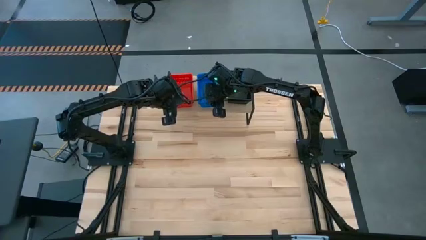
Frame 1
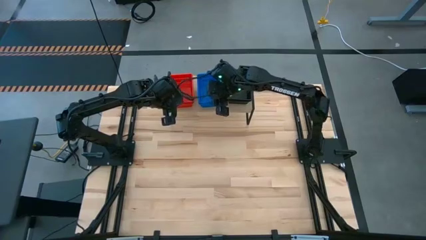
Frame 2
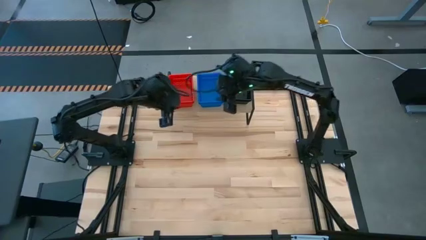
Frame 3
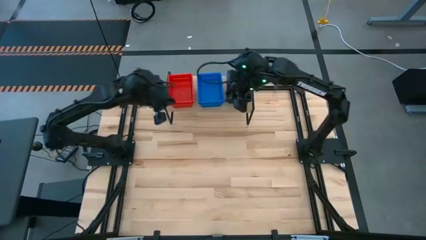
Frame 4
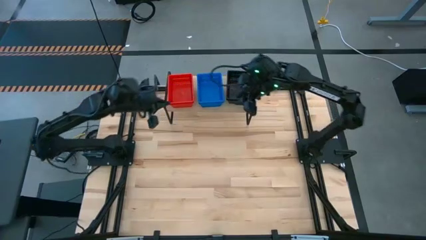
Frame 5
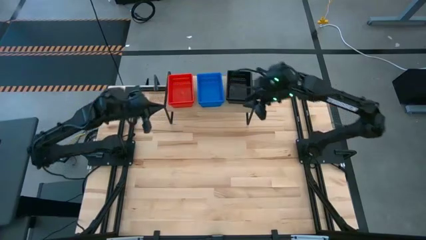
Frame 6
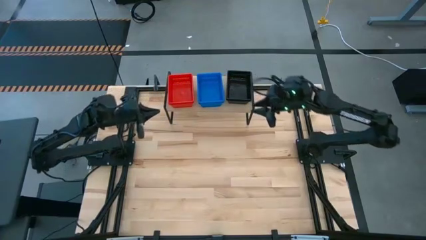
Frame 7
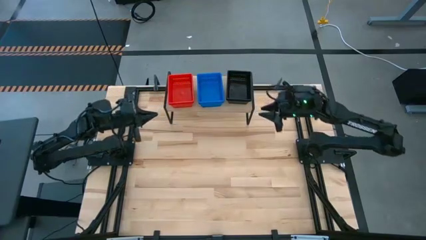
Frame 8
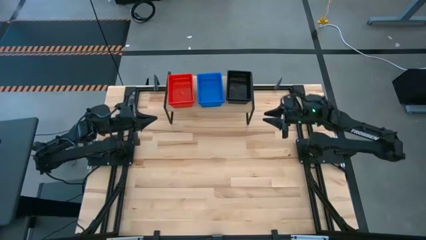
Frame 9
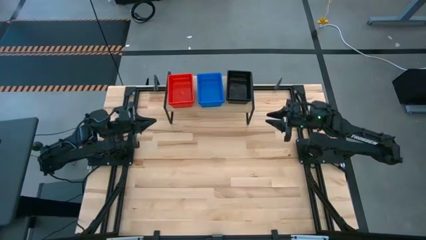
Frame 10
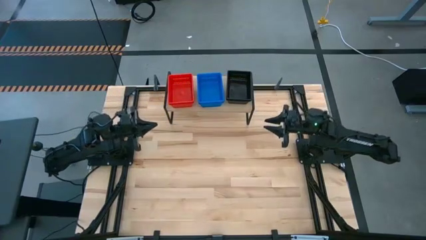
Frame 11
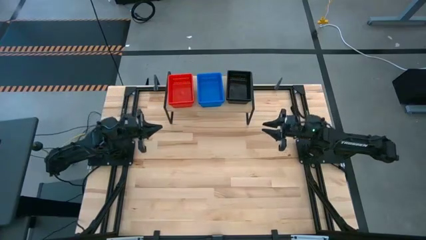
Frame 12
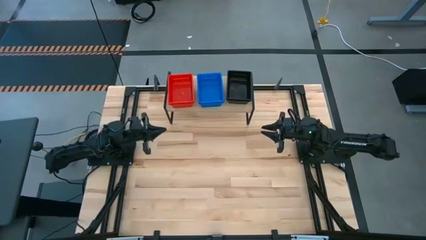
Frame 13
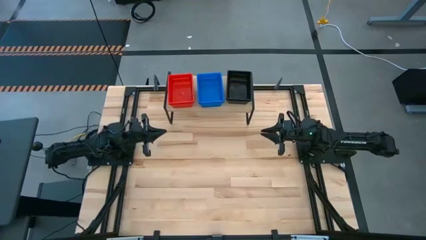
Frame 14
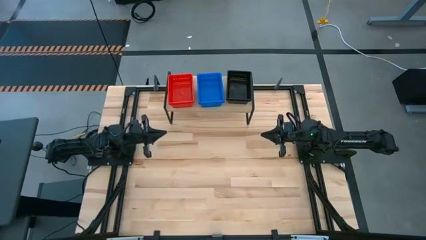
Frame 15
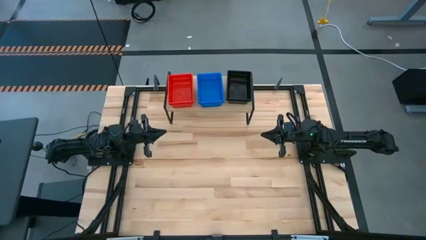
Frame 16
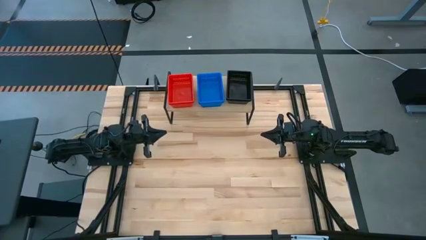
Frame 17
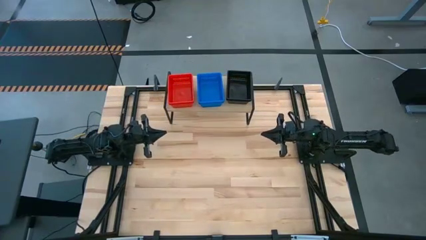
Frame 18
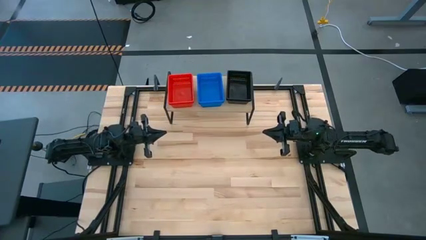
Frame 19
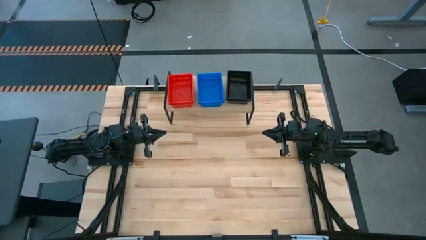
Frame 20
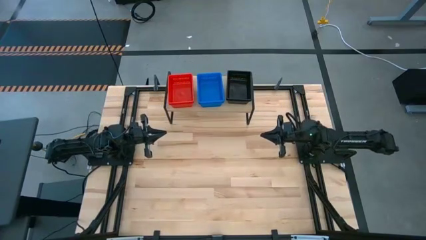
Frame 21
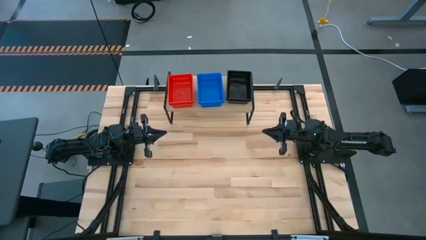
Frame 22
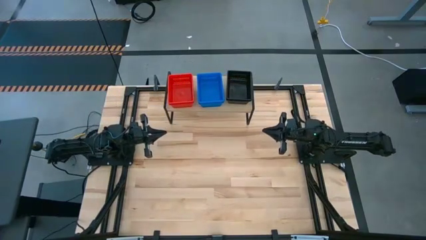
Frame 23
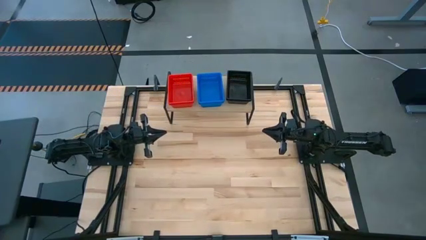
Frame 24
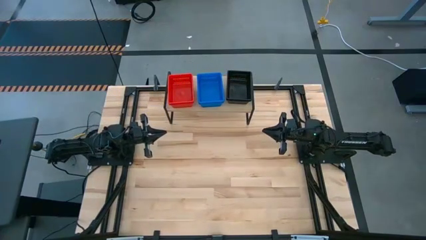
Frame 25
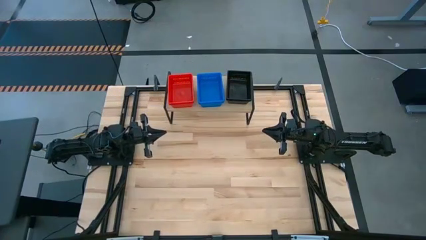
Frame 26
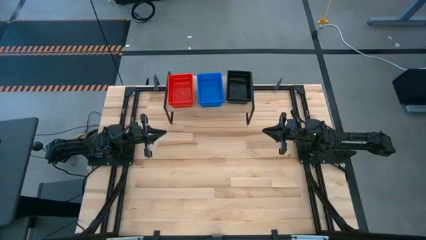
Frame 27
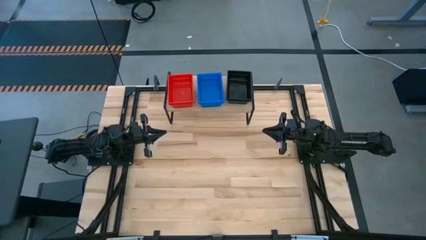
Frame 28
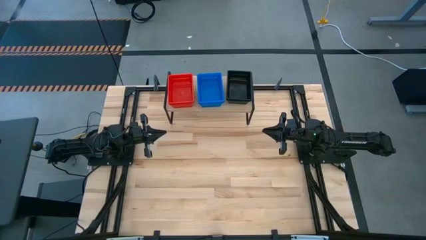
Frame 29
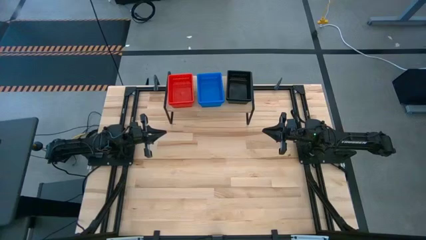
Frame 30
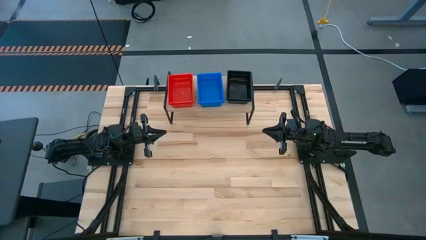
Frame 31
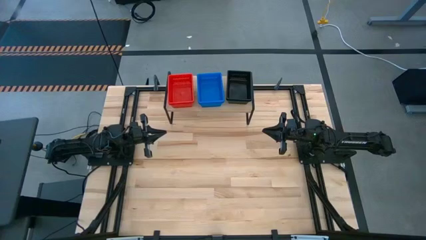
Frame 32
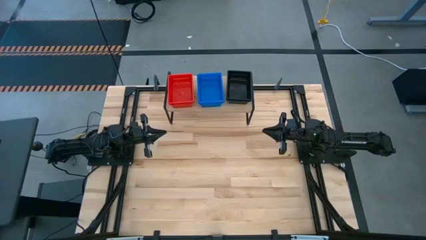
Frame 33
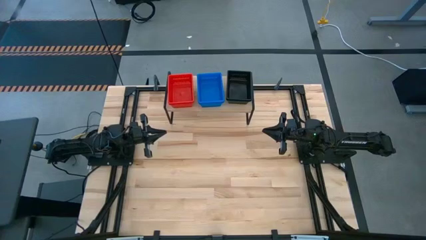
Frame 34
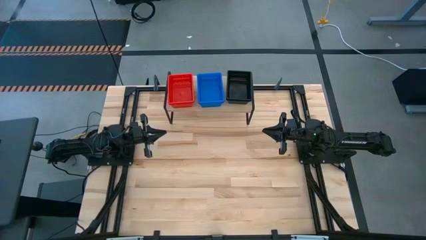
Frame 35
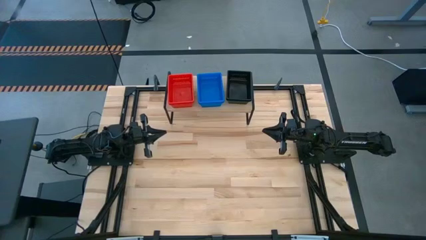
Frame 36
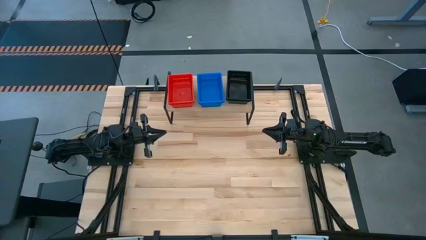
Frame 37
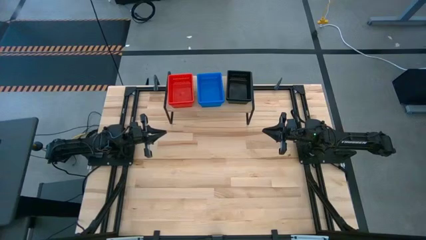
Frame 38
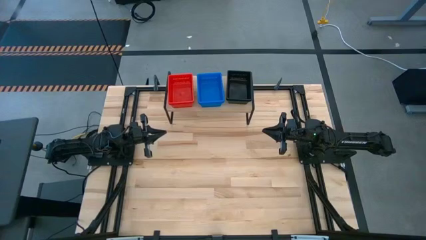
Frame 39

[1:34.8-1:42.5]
Task: Stack baskets on shelf by color
Return to Home Position

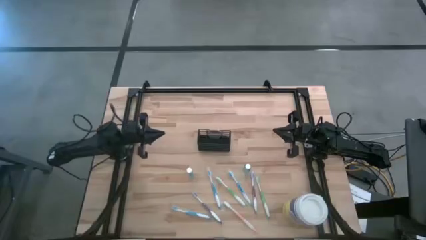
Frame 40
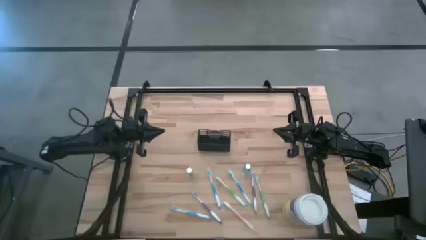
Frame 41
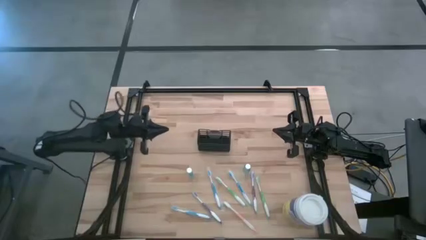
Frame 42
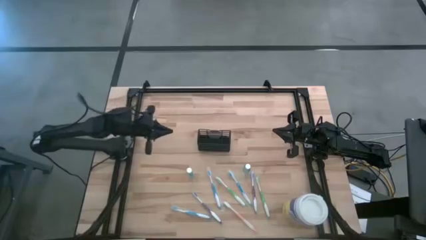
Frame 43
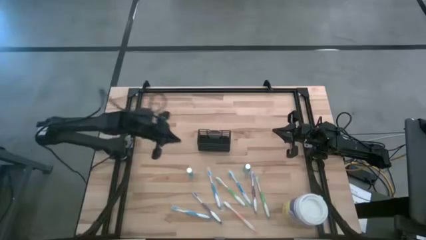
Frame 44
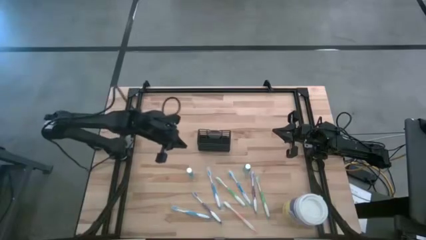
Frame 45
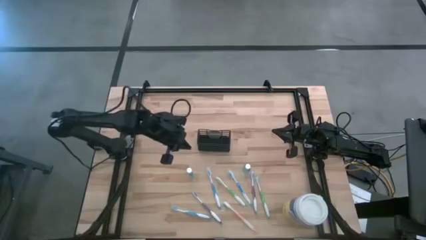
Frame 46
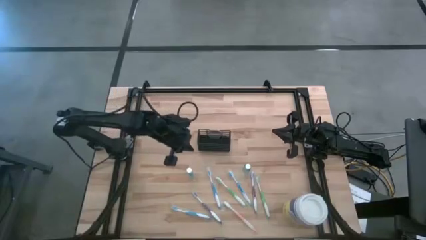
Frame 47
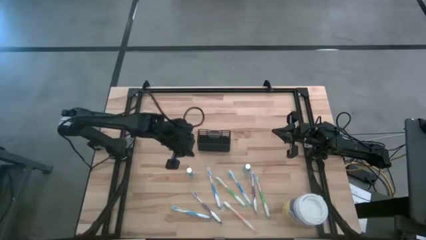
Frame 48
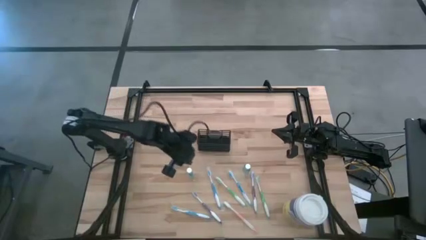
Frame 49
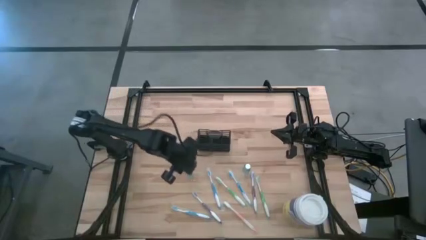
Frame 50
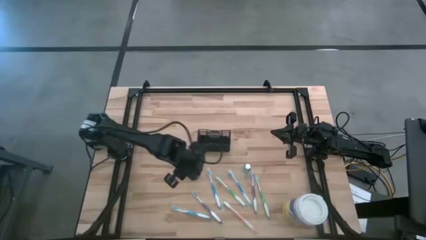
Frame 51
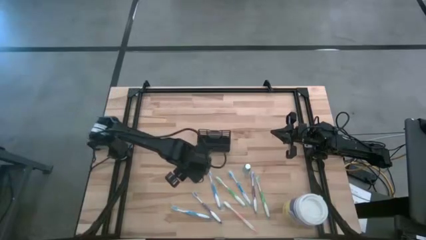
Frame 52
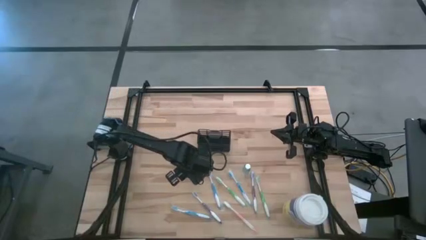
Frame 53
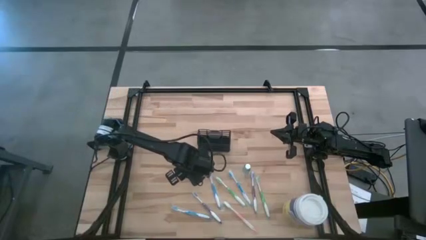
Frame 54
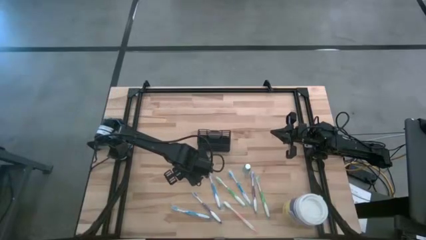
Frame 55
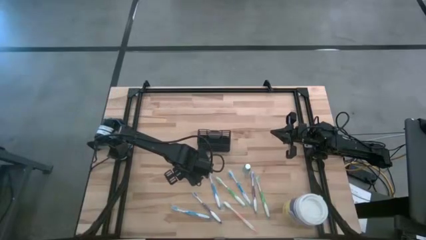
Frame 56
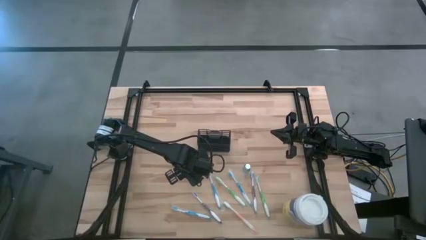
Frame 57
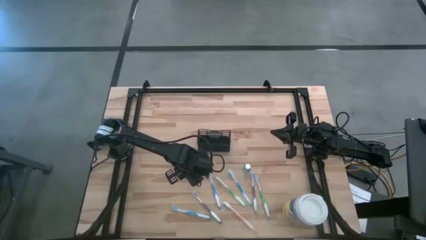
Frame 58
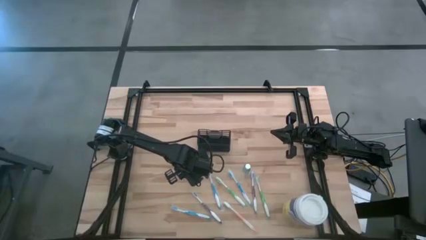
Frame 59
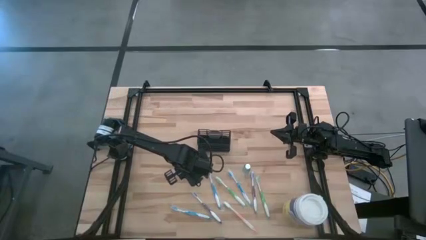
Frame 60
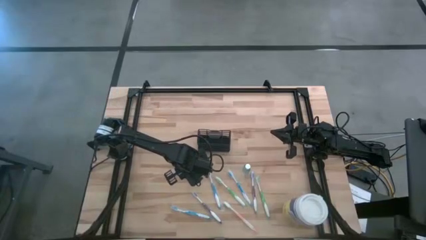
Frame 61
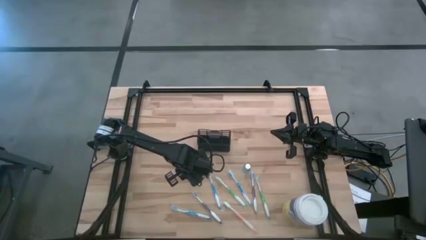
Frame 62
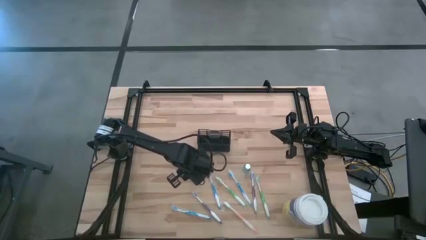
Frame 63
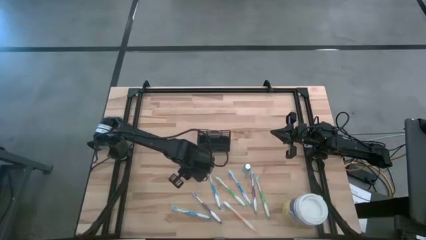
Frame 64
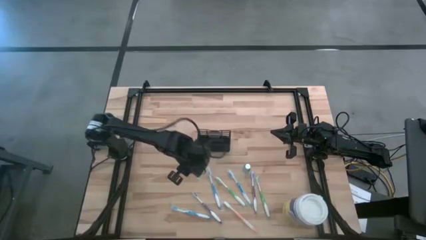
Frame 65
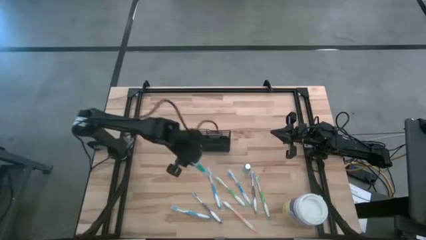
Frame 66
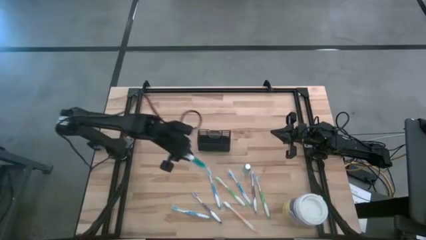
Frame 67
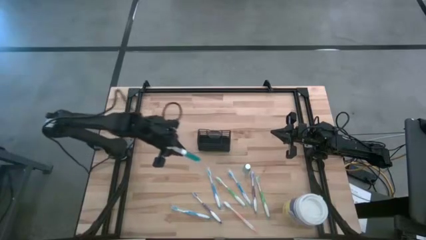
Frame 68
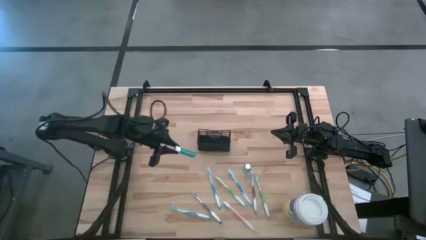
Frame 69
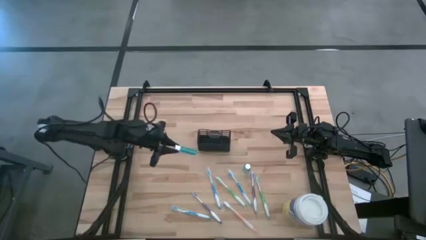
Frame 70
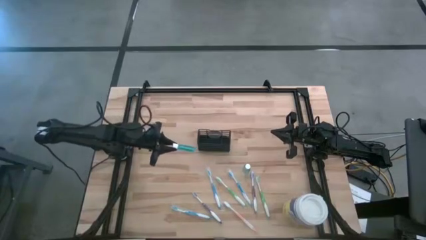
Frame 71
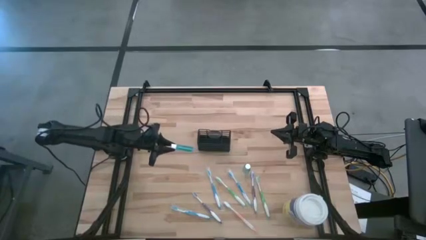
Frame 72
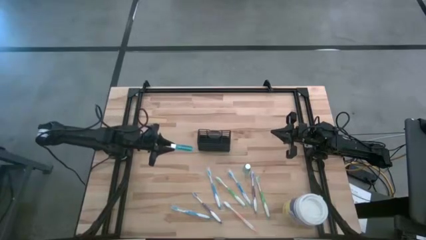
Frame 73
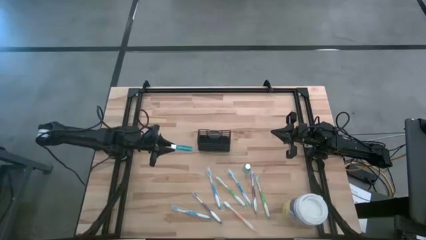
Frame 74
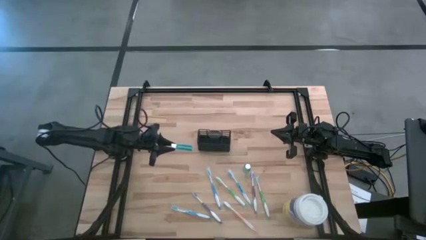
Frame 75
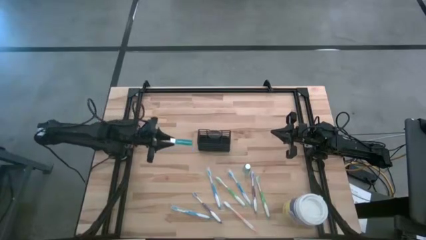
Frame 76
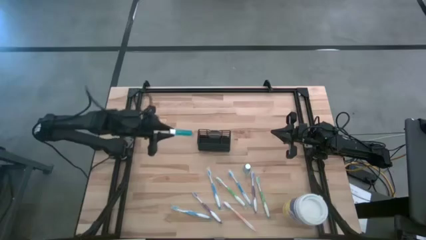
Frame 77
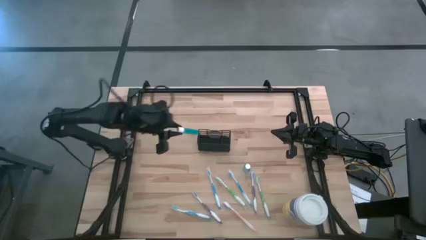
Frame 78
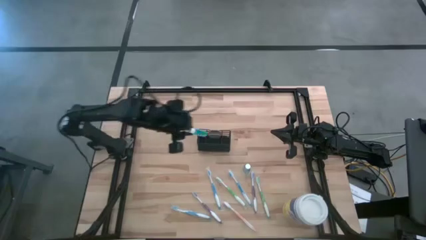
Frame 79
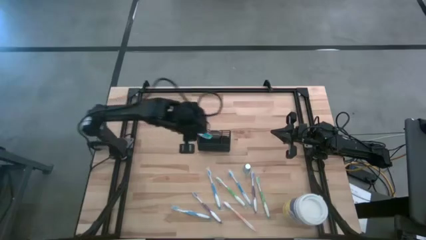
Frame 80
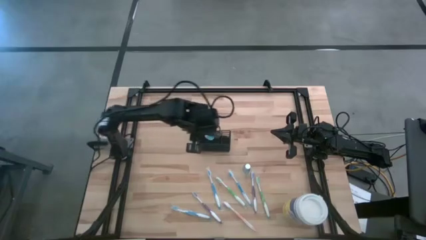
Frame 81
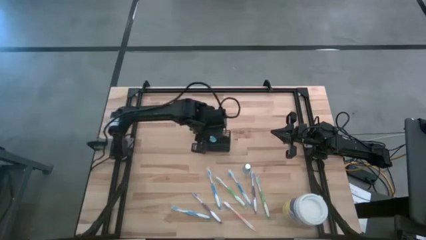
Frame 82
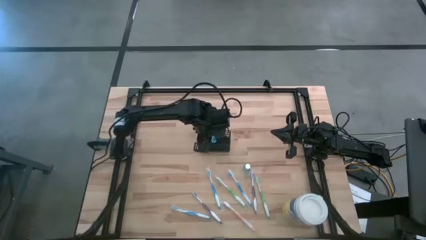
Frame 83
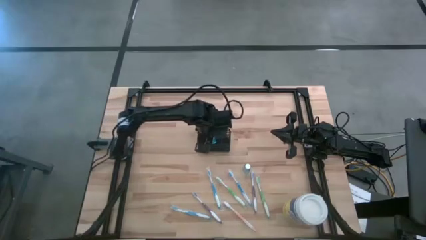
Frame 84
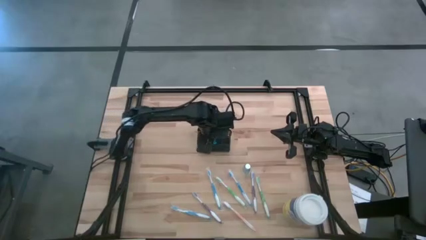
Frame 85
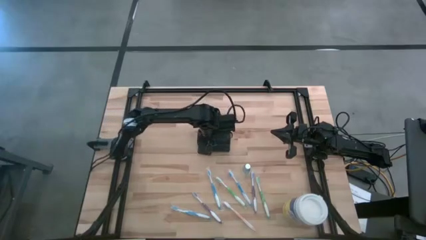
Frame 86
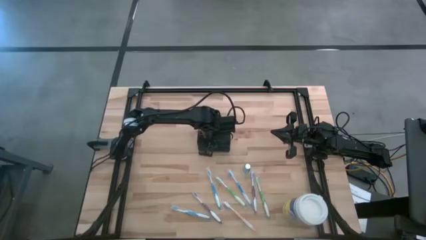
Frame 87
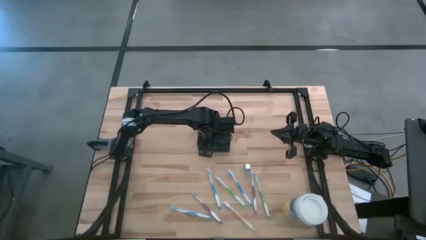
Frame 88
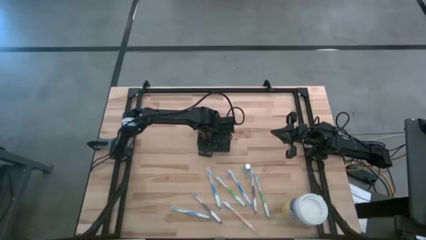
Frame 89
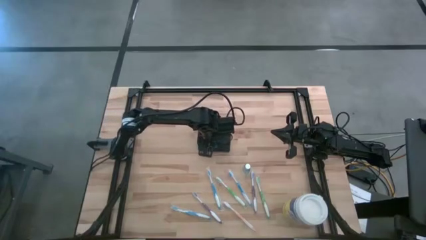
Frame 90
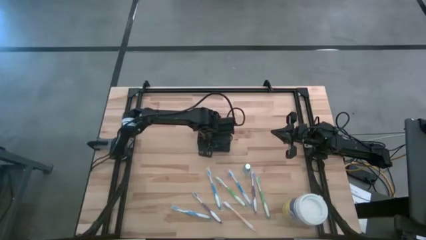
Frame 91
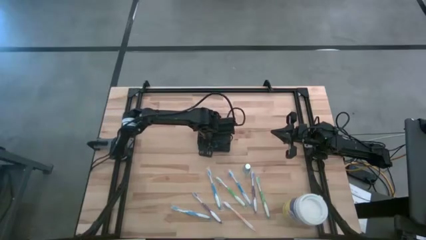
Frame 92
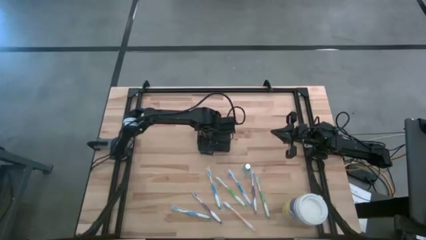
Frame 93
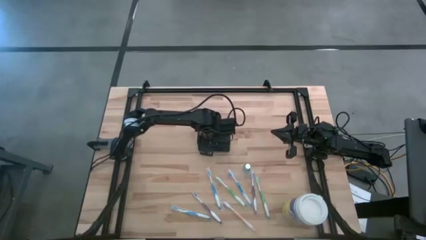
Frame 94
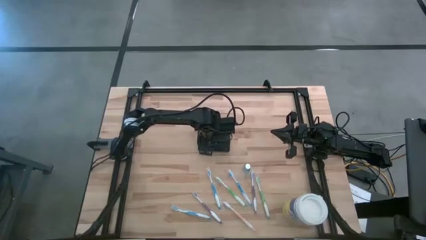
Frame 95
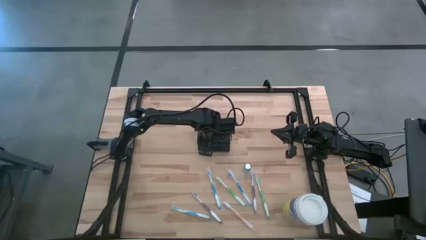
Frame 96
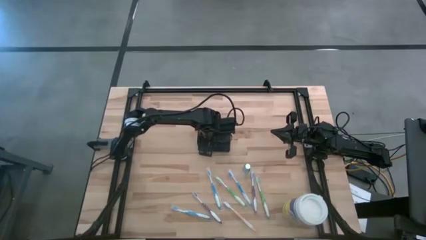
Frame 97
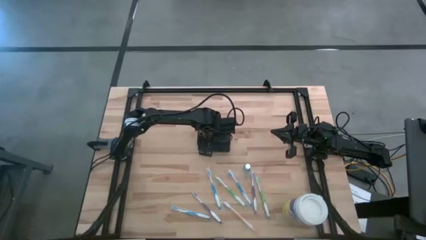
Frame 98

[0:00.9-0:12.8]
Task: Pick & Place toothbrushing station
Put the left blue mouthwash into the black wire organizer
